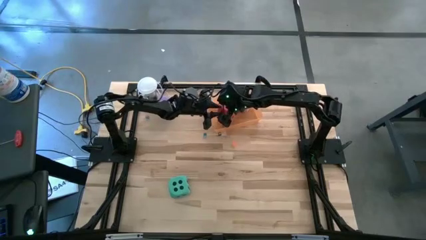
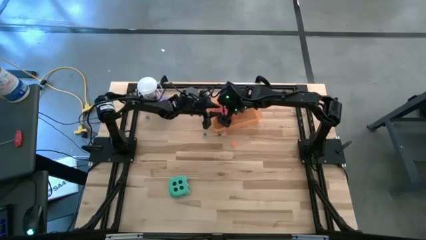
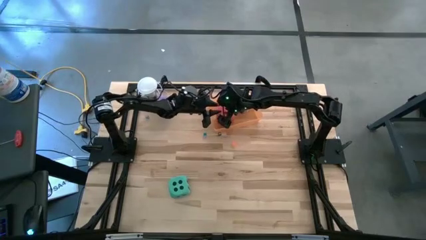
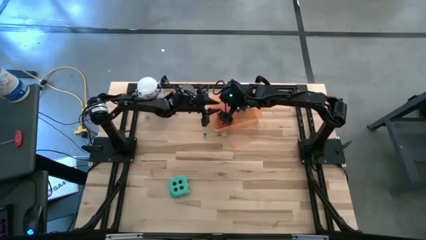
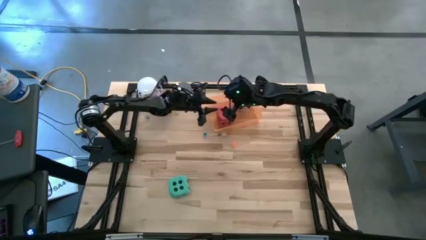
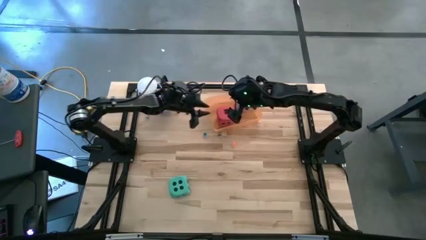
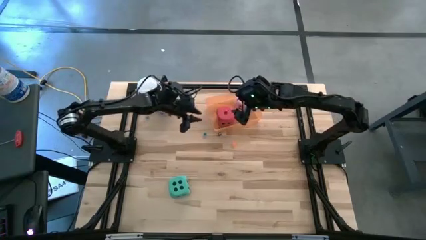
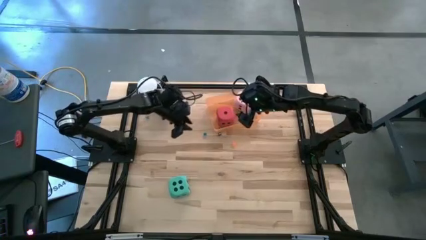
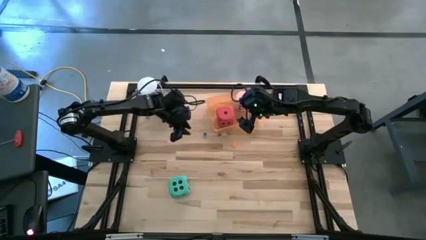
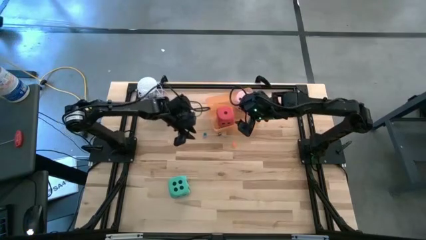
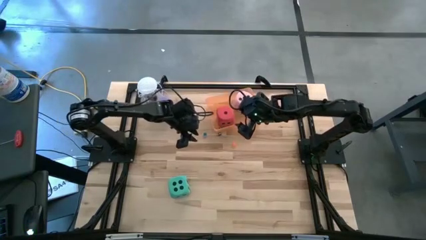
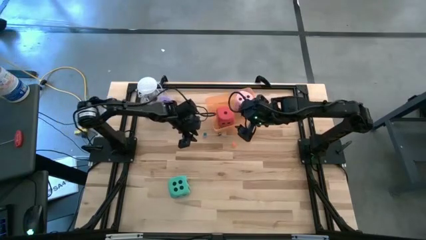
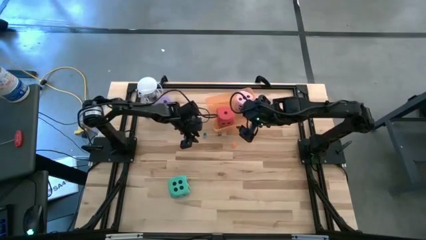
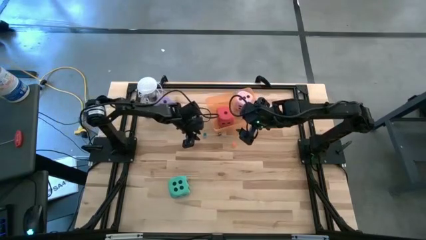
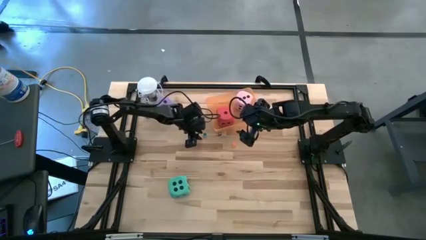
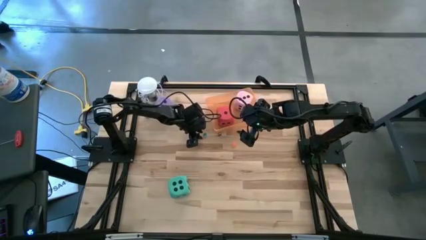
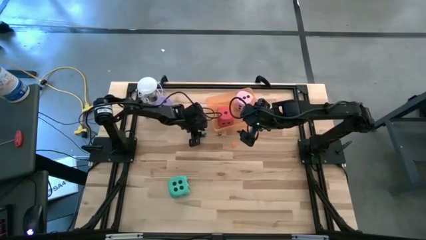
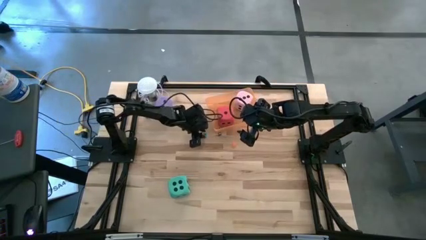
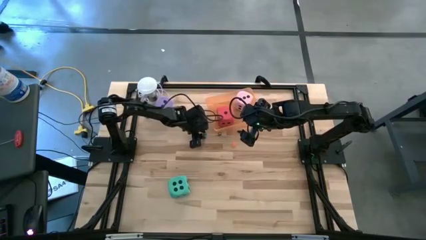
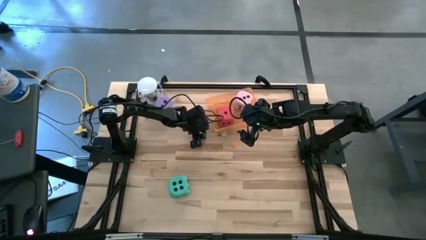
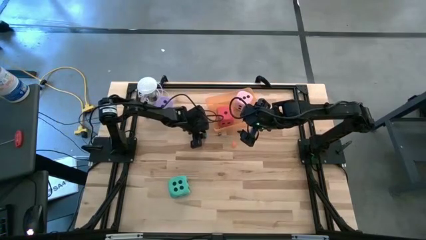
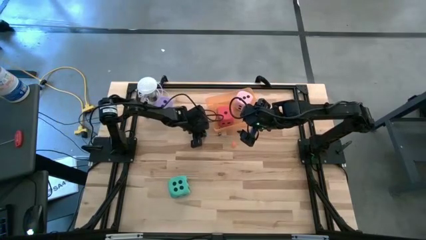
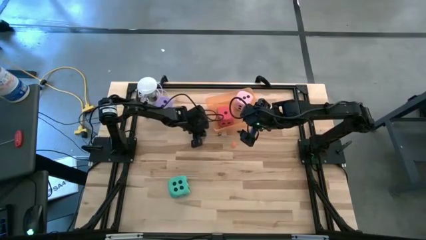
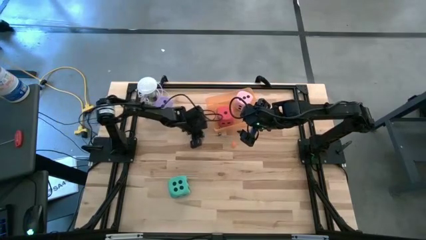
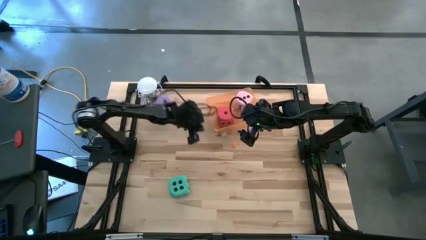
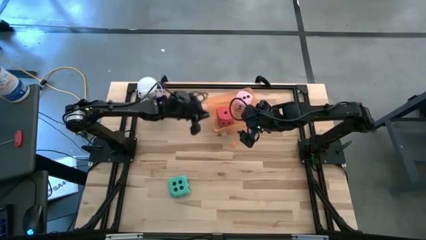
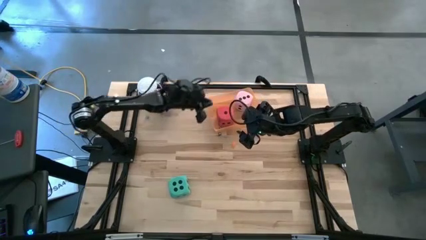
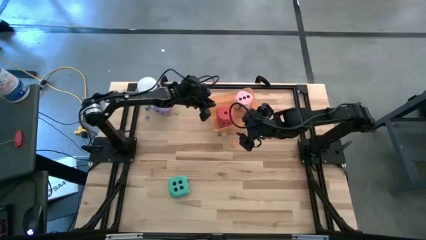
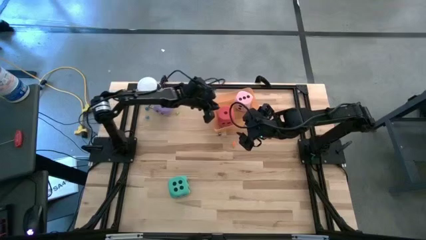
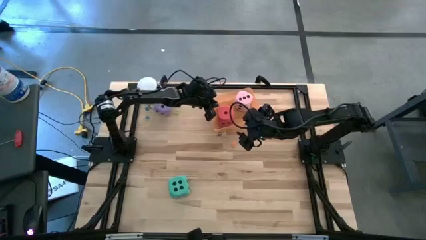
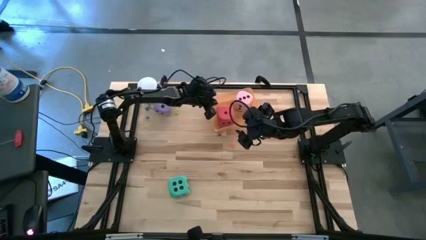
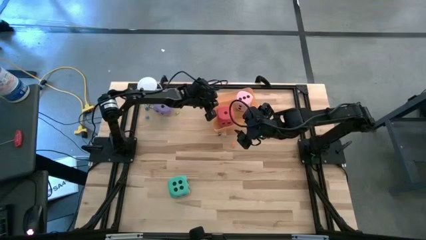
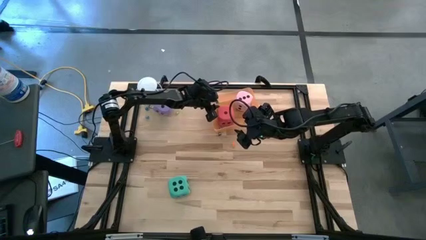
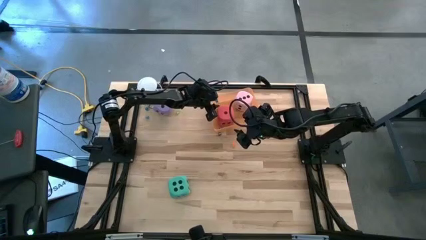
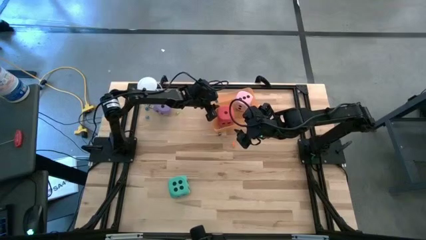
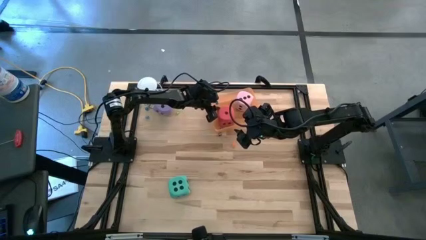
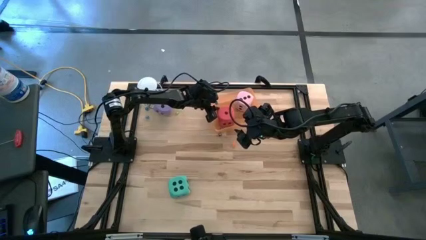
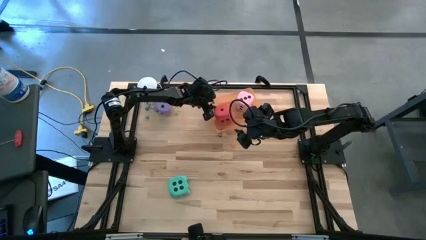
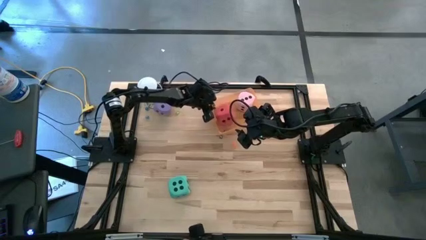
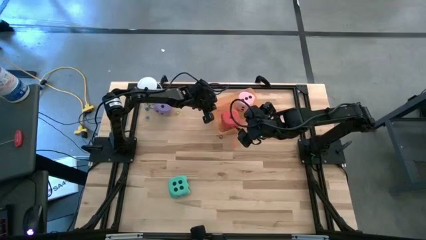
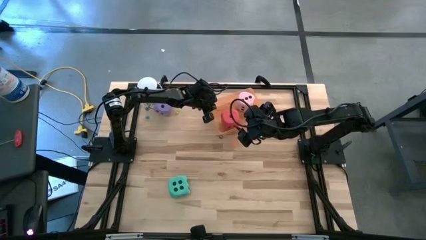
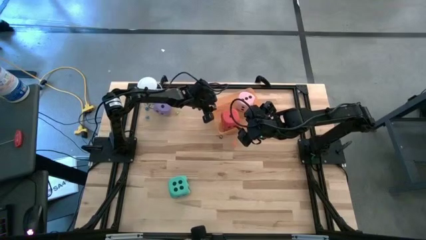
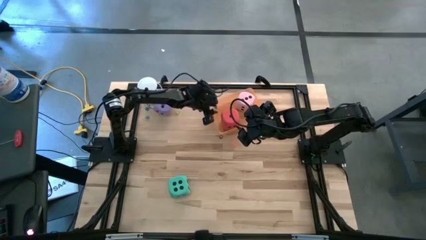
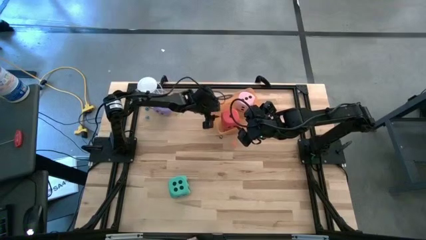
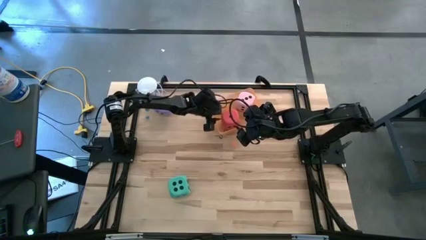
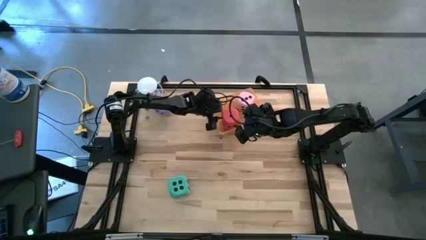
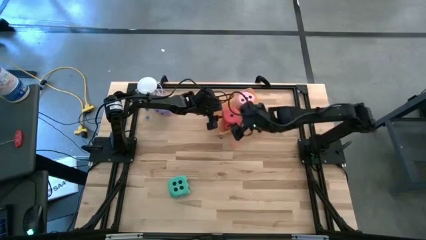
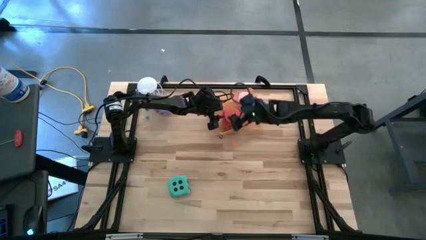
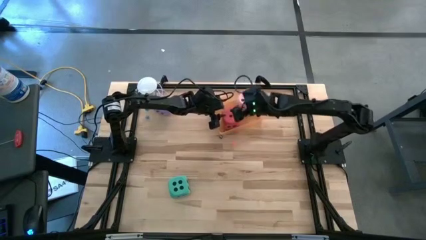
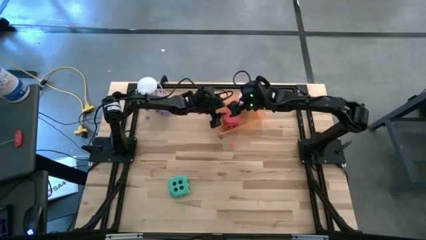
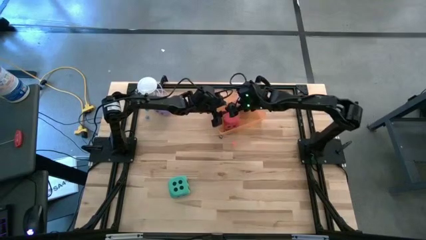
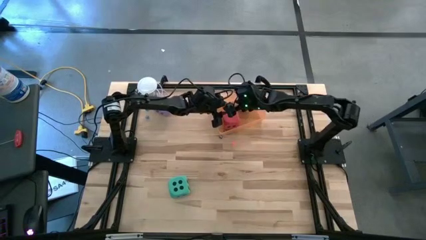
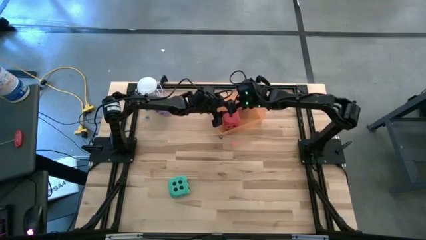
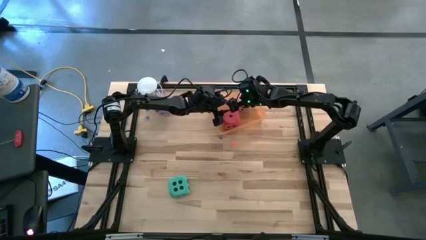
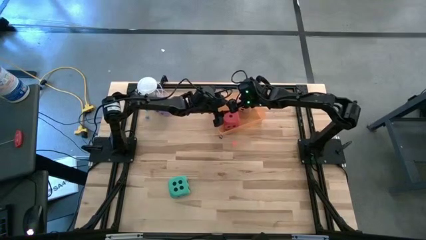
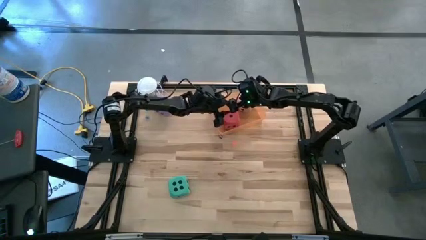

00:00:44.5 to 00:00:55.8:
Task: Pick & Place Dice
Put the bottom small blue dice into the orange bin

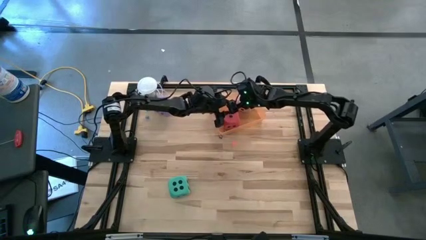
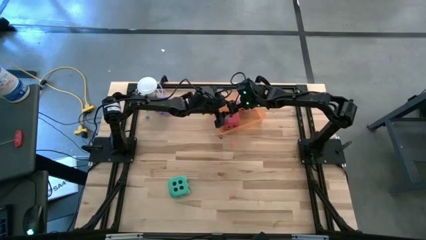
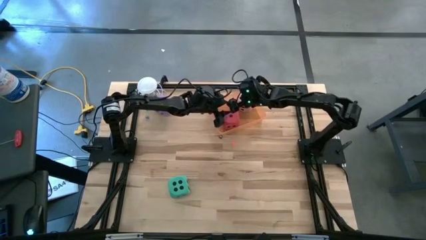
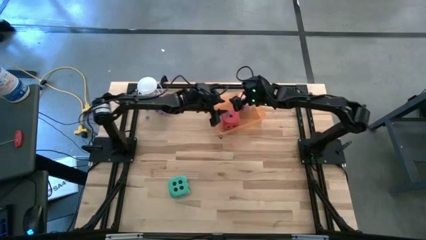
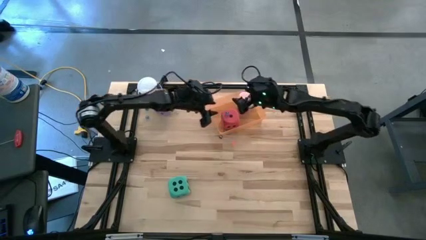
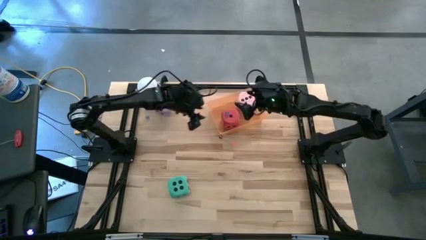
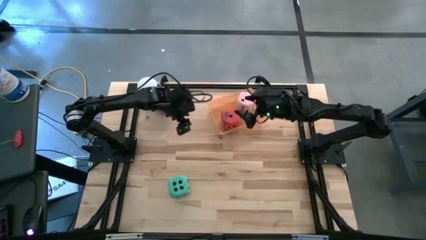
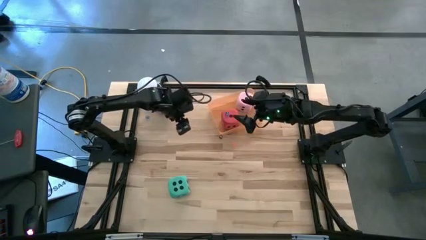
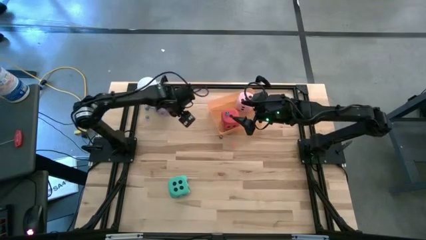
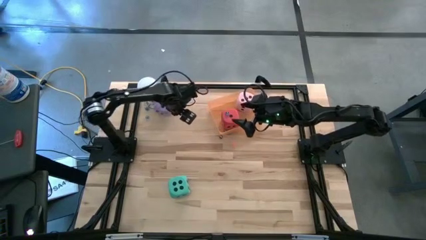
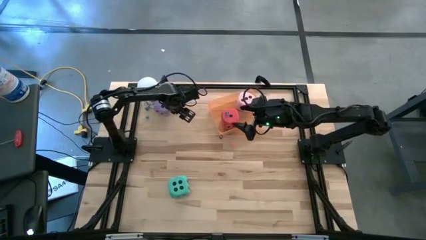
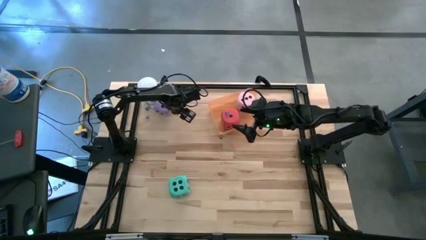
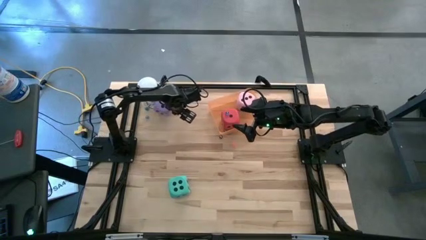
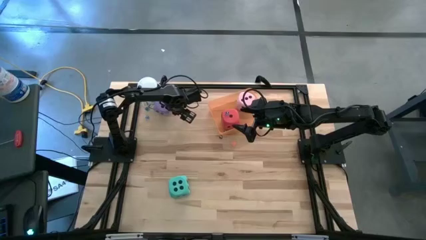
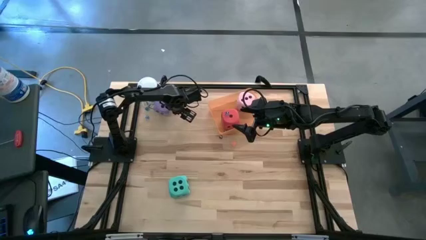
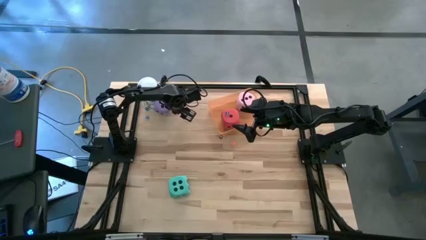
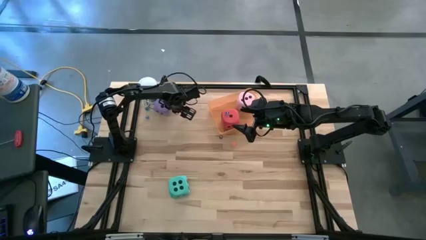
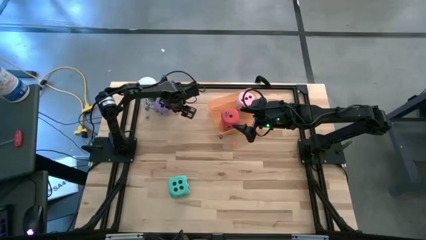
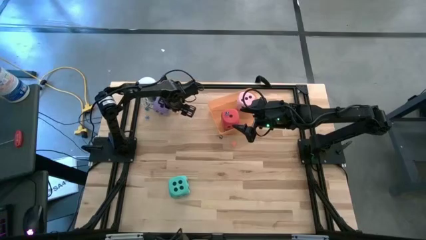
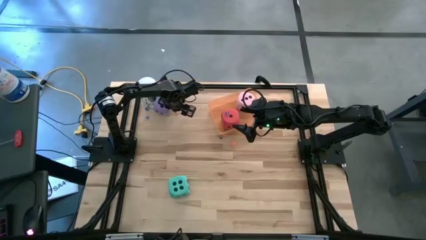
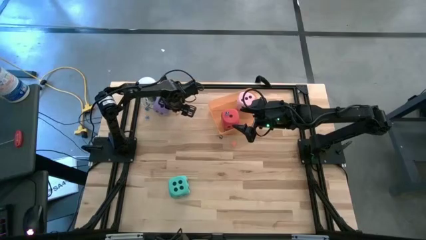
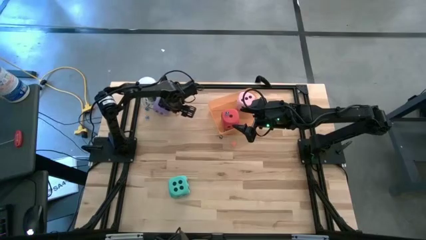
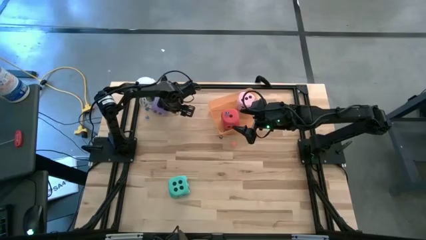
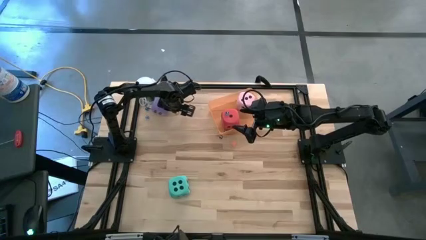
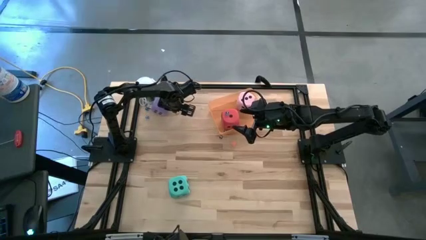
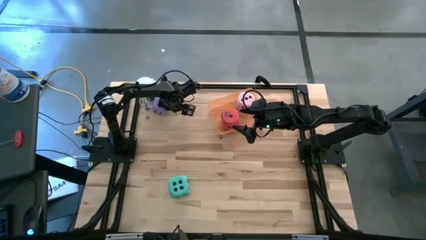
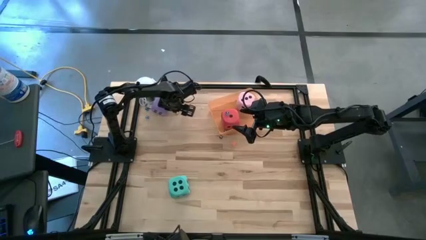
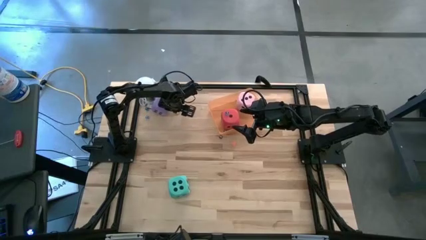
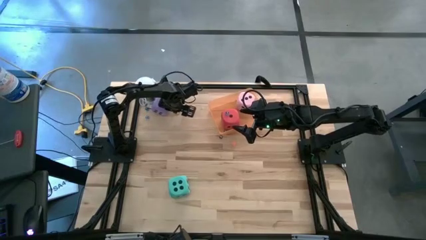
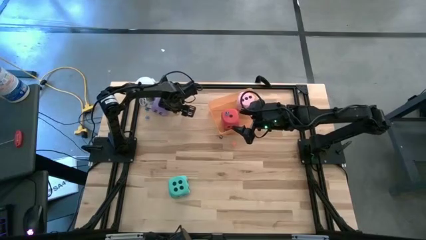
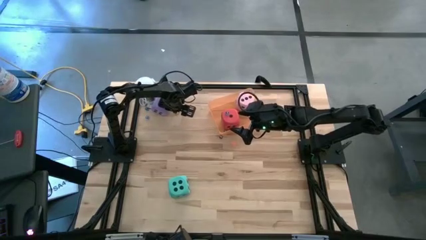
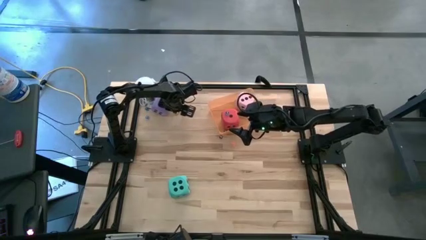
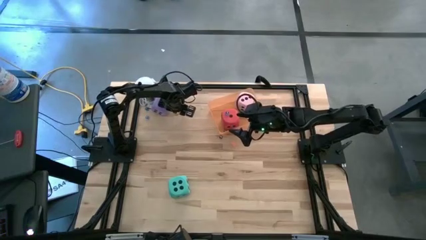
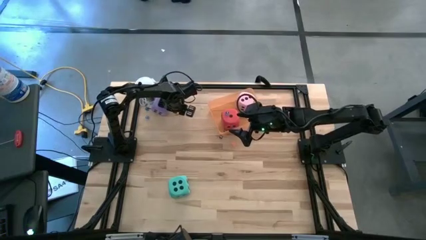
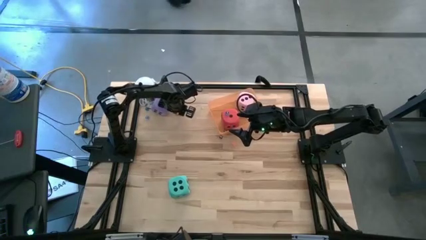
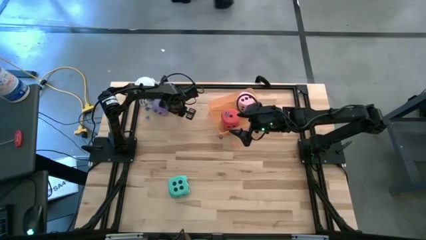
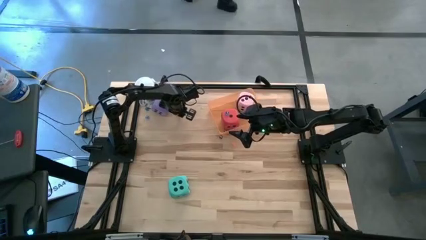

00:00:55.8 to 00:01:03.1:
Put the small green dice into the orange bin
